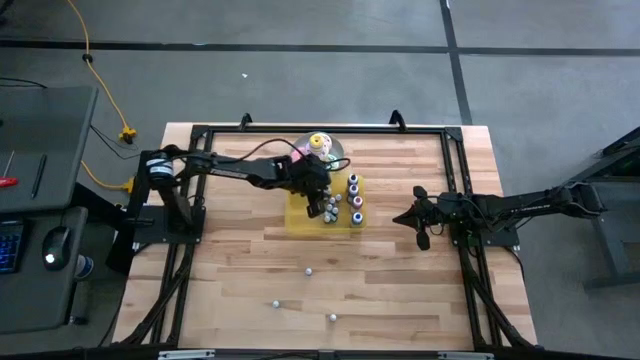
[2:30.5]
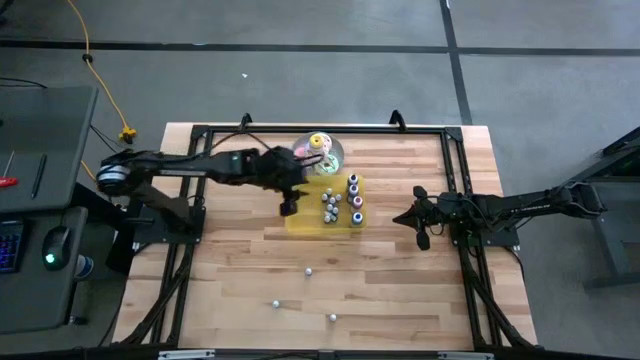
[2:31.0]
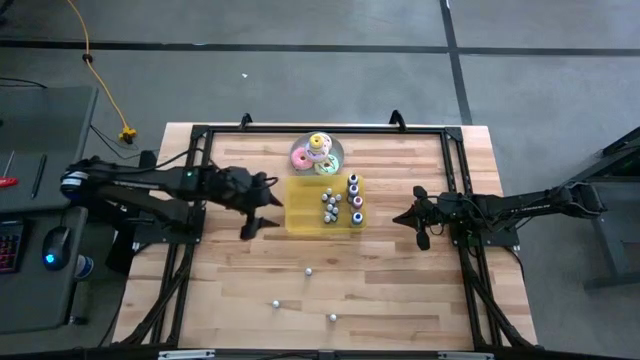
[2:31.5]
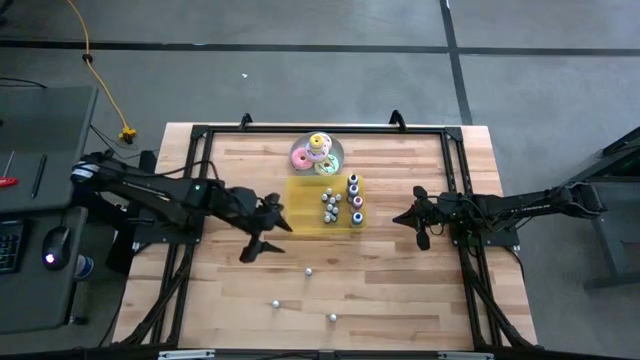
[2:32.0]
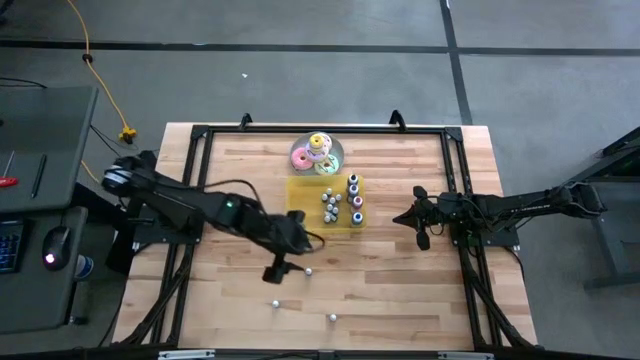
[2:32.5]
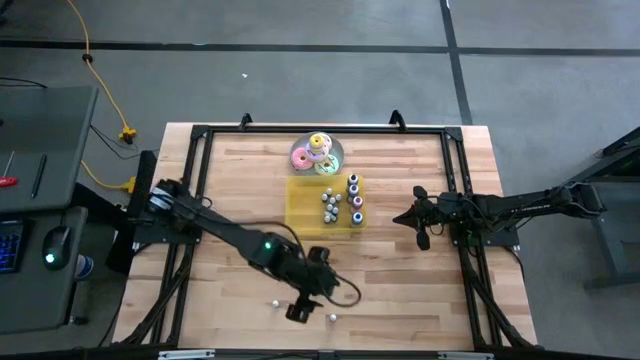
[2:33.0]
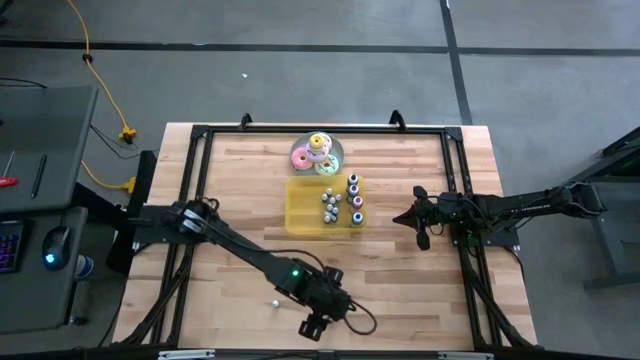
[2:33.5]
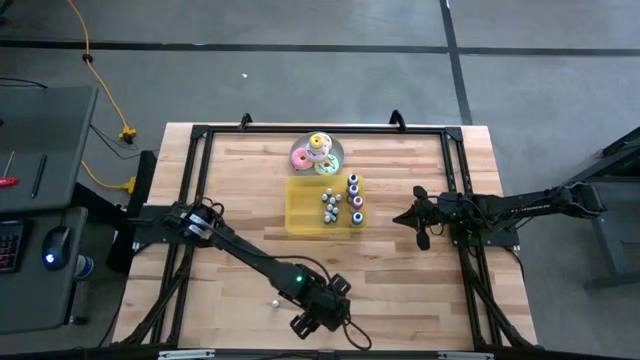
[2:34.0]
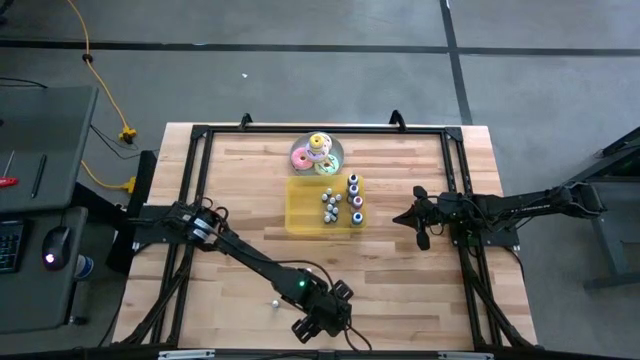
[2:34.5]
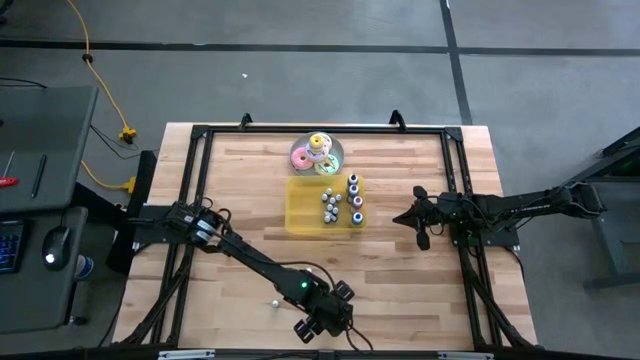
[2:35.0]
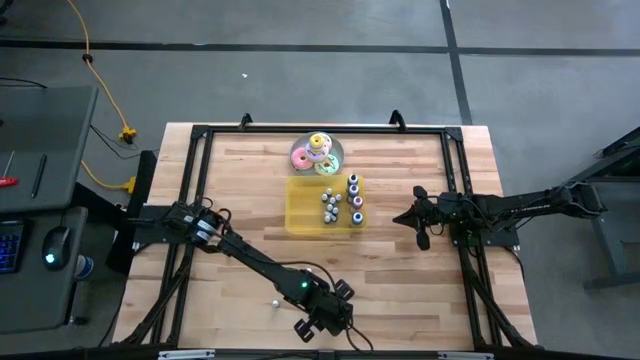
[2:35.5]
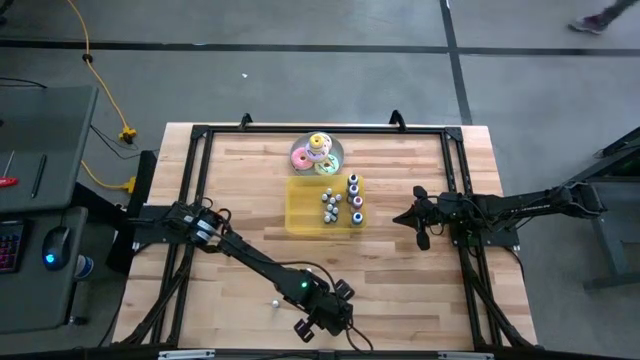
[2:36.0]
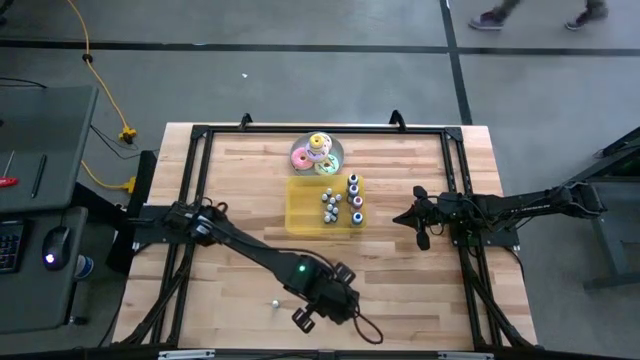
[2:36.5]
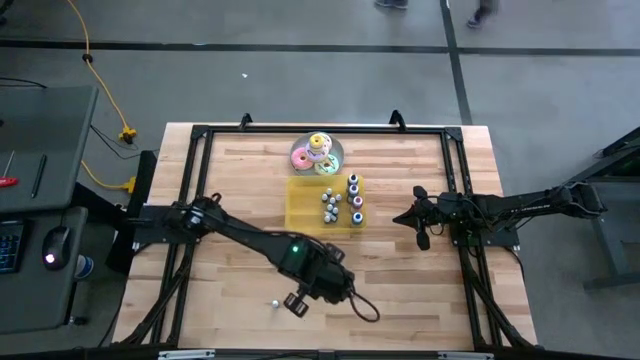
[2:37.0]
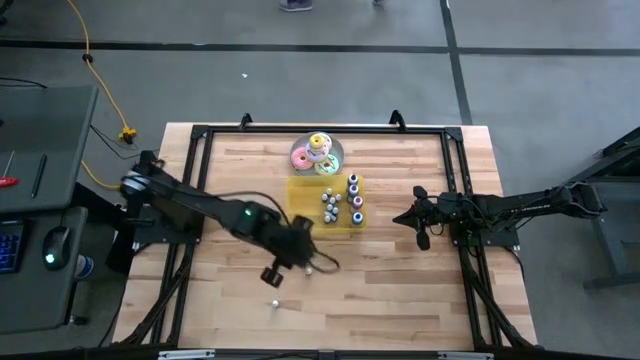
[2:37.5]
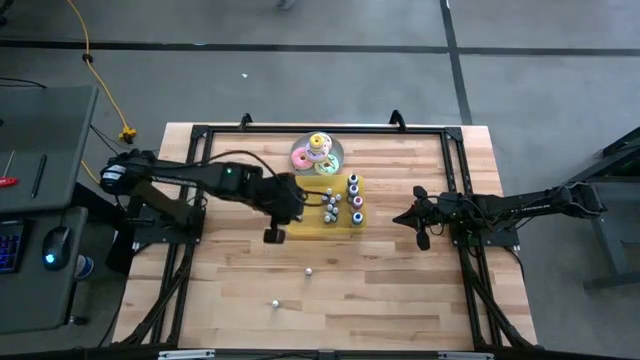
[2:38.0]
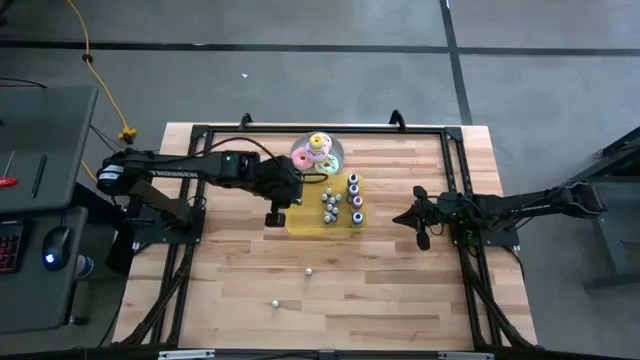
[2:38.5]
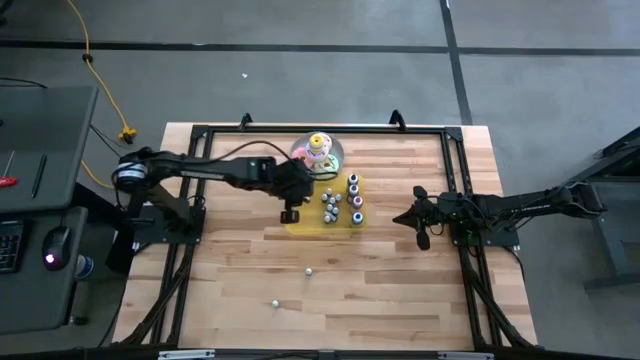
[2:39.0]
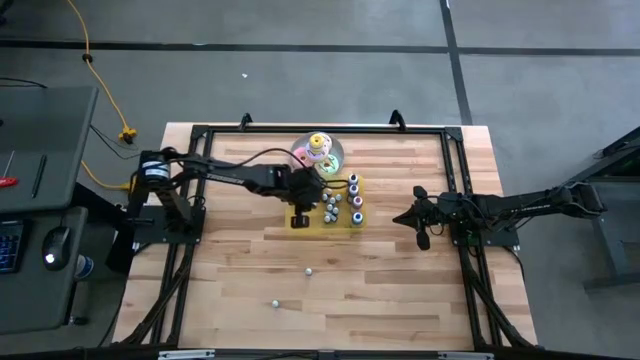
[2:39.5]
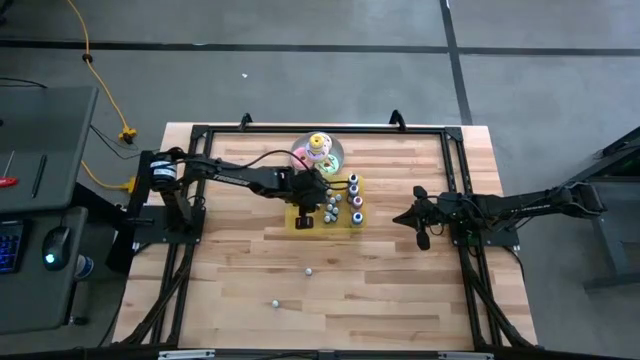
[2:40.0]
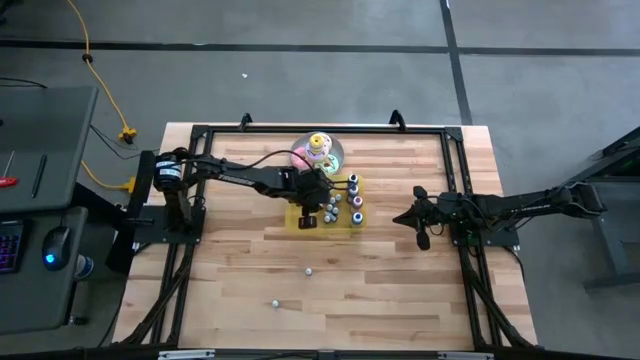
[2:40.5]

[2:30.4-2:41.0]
Task: Pick & Place food coloring
Put the small red food coloring bottle into the yellow container

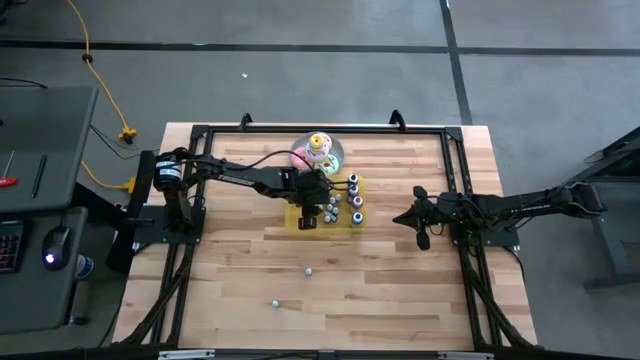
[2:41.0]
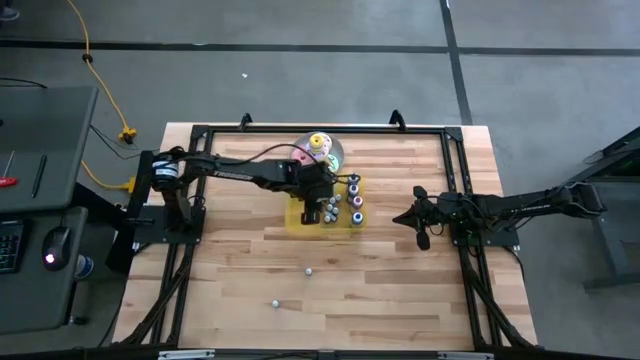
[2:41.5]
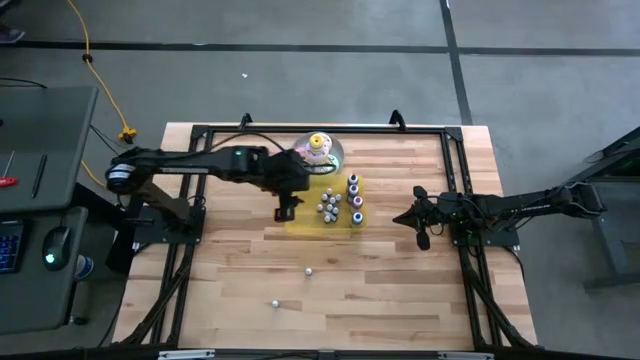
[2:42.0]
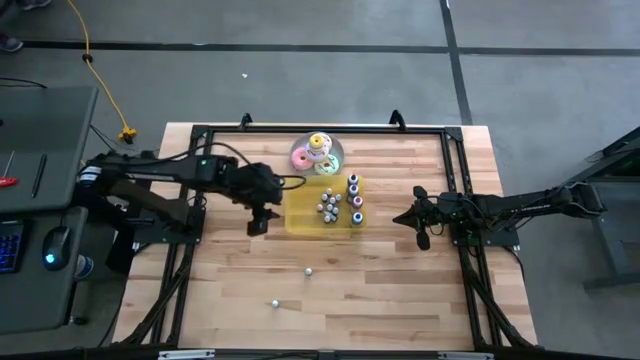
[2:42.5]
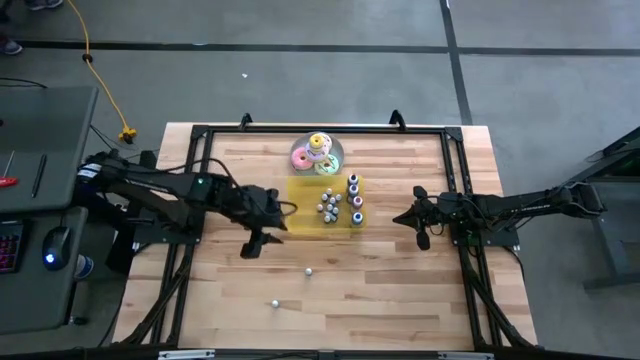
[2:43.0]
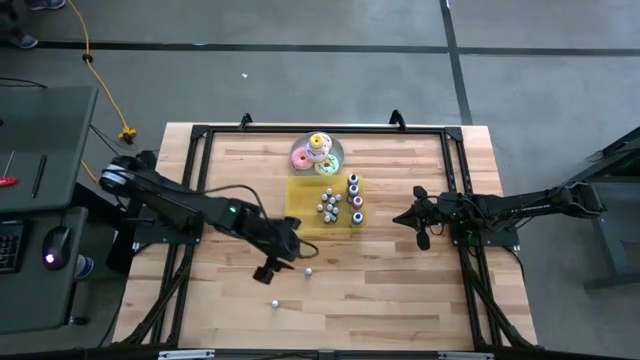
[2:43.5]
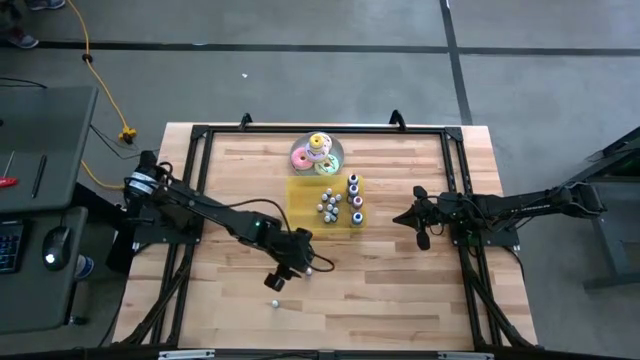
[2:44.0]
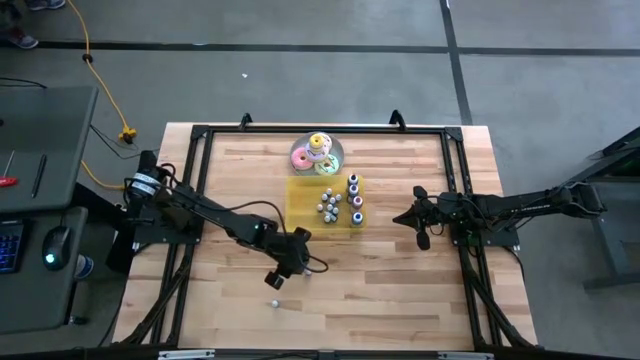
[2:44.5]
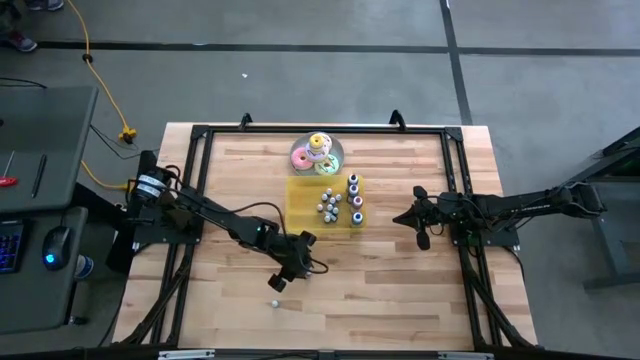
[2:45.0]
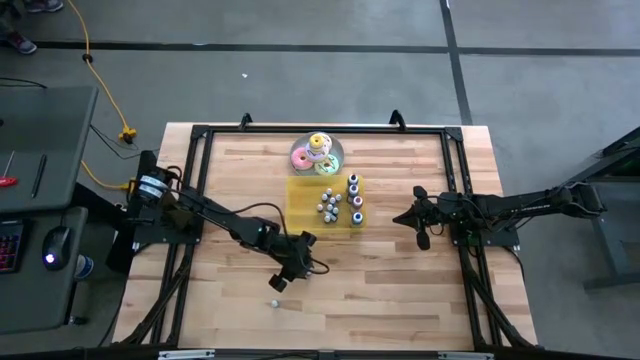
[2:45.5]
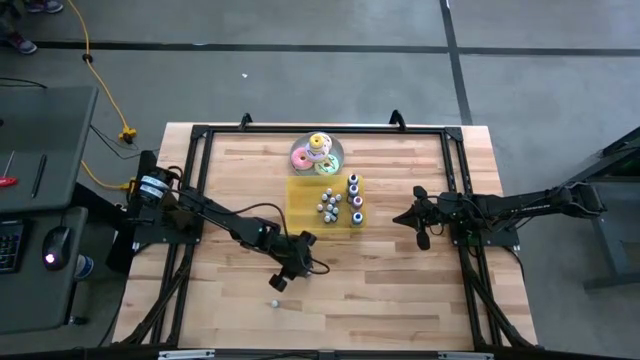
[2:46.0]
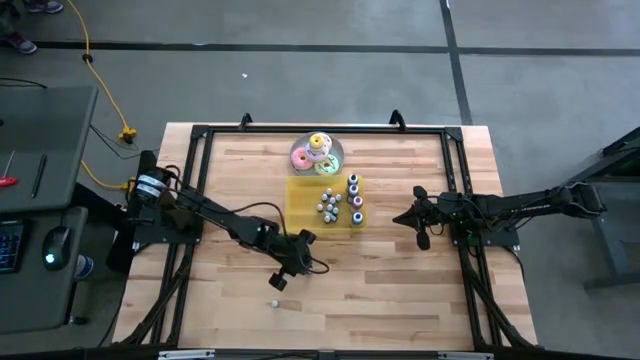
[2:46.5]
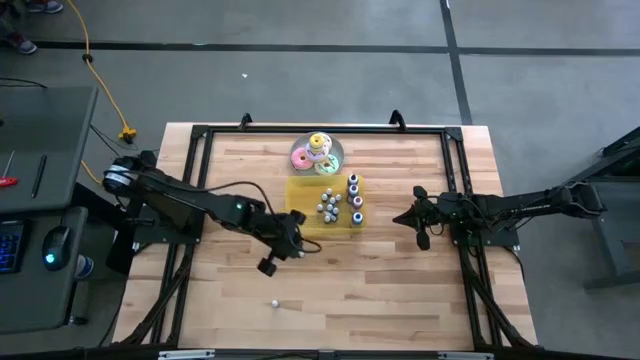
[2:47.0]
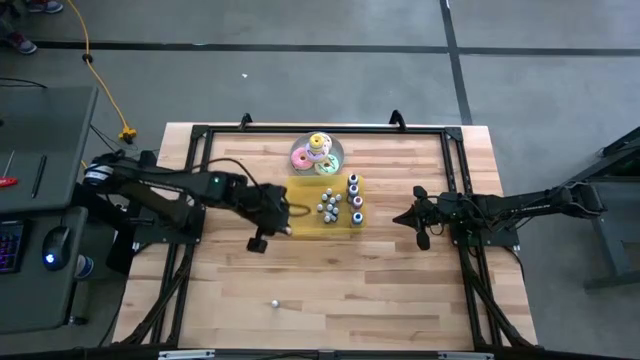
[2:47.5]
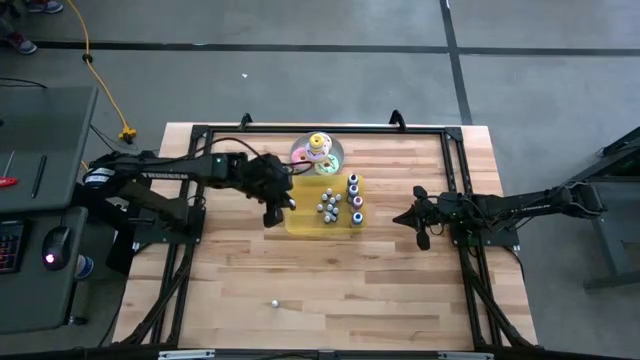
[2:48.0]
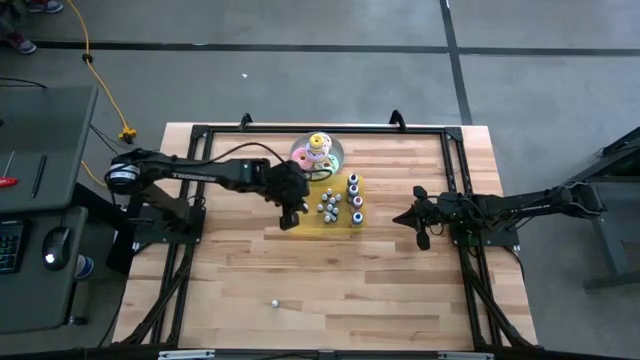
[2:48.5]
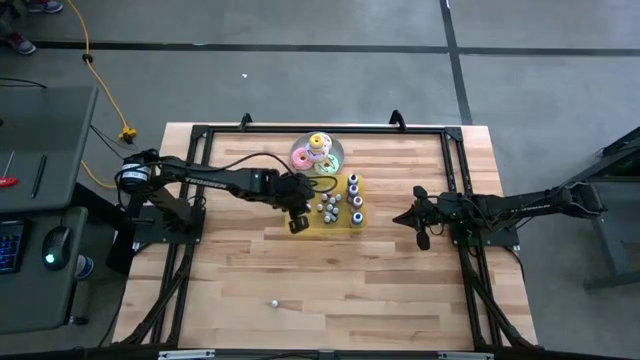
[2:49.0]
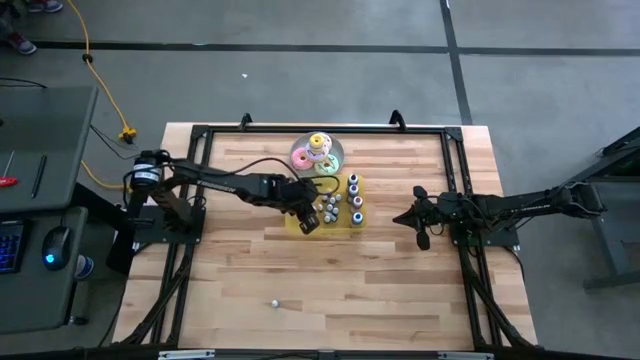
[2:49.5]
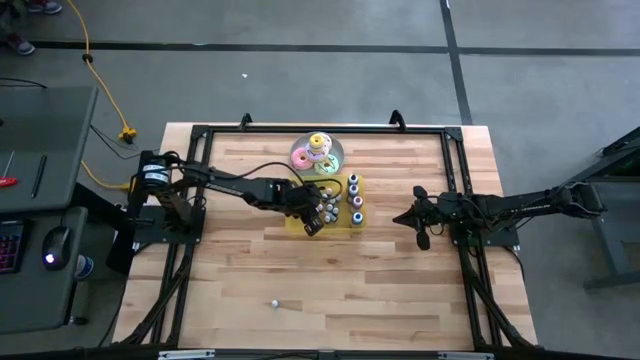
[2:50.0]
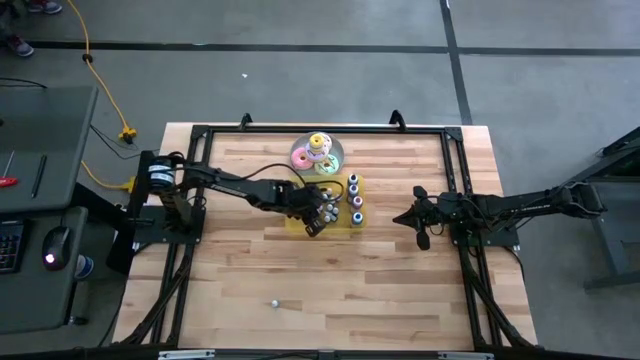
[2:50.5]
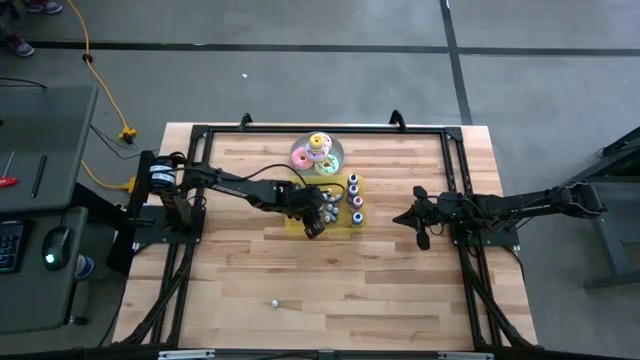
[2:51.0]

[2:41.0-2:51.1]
Put the small purple food coloring bottle into the yellow container
